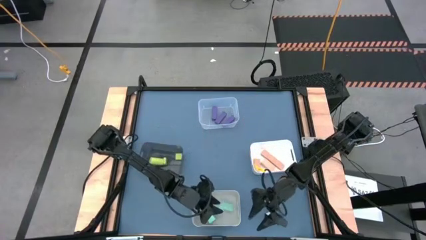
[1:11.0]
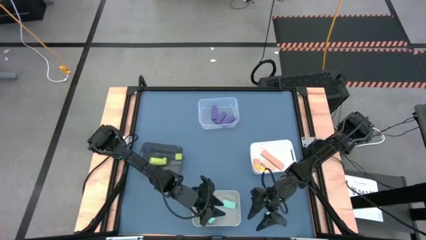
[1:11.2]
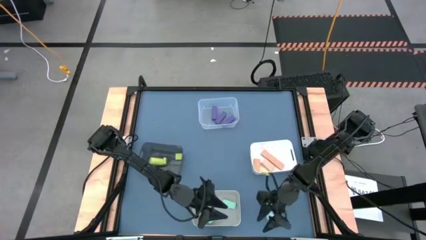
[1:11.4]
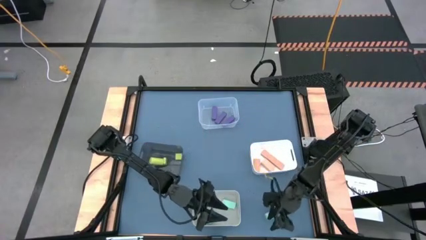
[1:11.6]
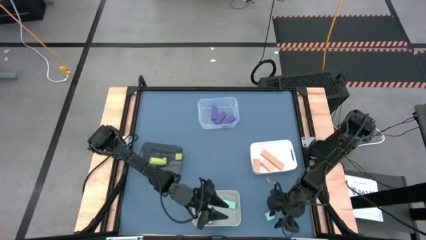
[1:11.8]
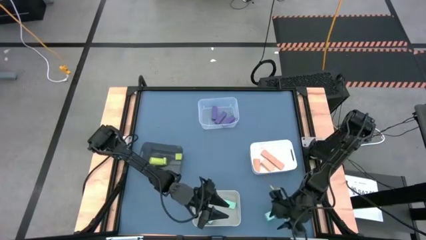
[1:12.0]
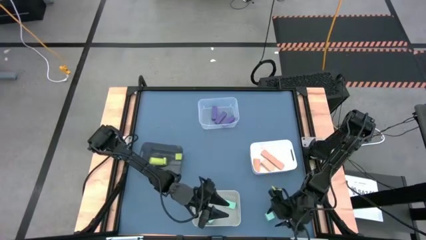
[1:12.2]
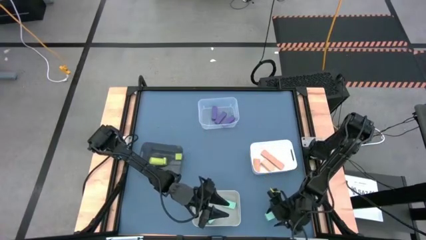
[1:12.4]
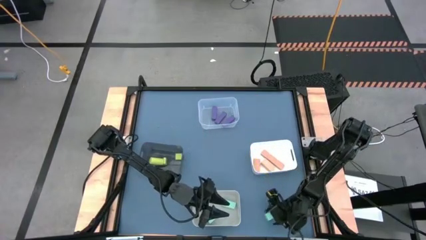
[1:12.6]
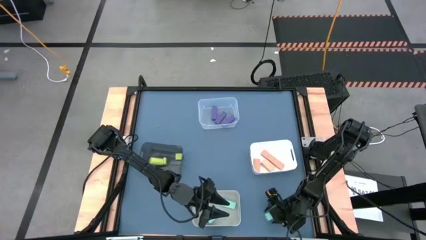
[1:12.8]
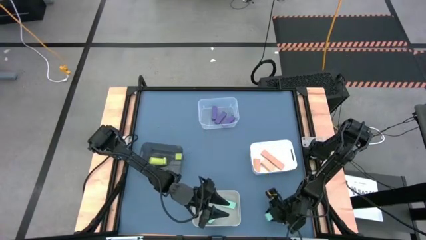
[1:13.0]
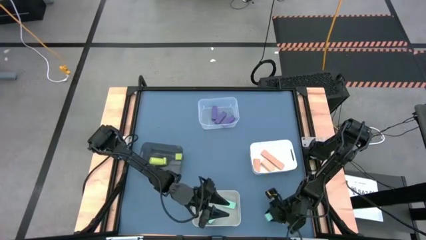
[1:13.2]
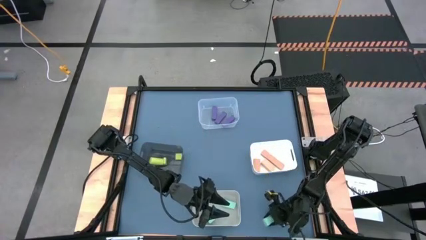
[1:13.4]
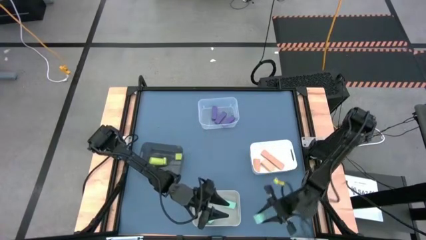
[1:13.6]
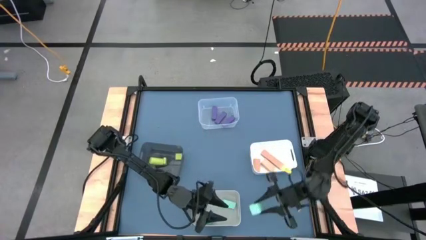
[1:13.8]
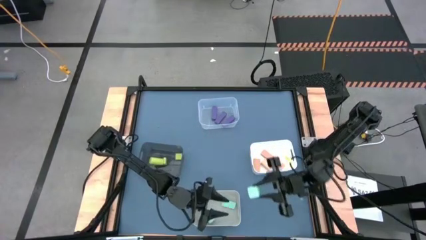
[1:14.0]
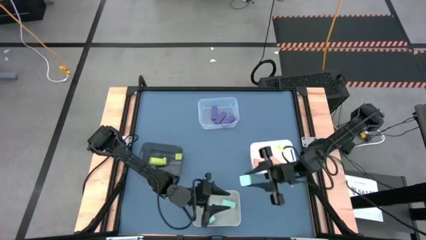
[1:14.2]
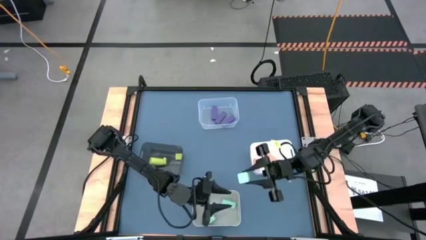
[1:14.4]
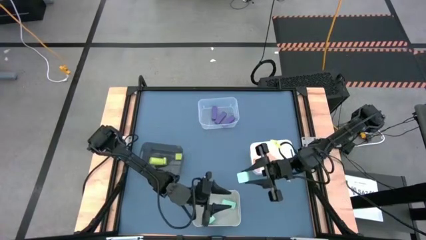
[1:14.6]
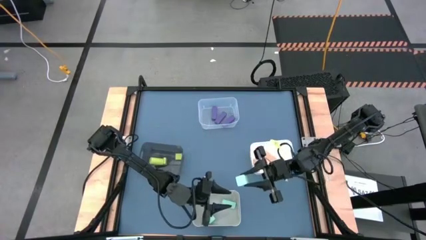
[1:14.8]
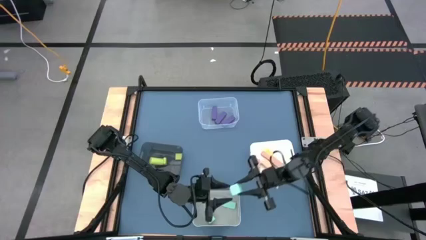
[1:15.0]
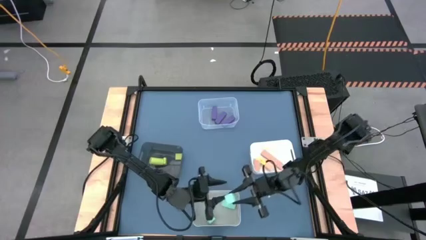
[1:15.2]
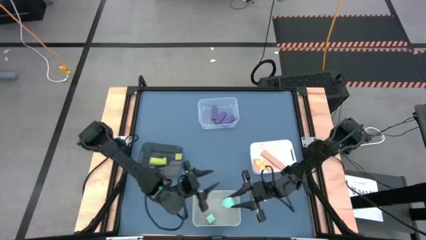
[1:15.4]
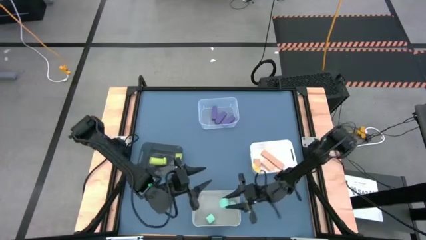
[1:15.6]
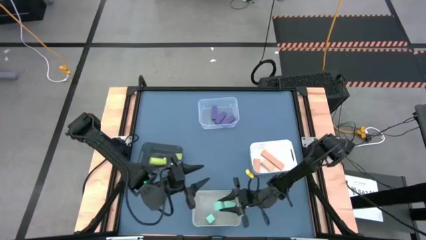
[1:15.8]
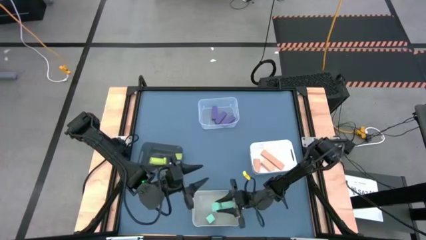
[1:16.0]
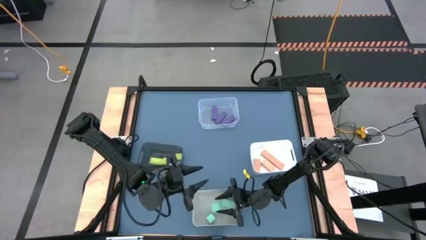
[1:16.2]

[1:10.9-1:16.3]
Task: Sort & place blocks by color
Put the light blue block into the gray bin

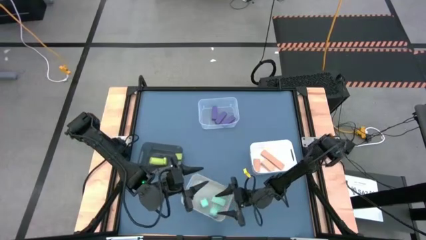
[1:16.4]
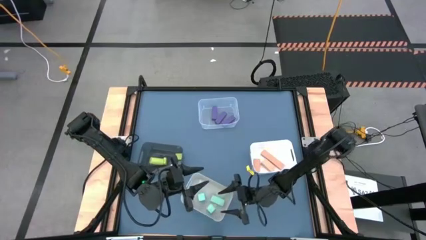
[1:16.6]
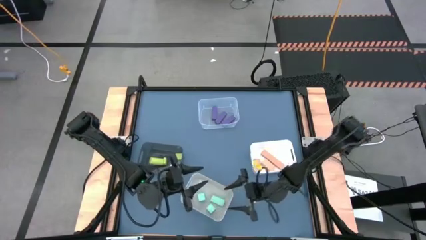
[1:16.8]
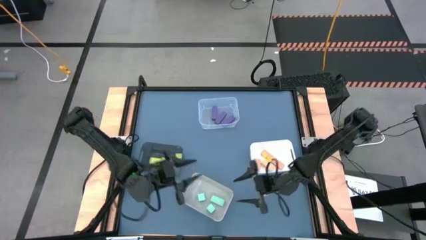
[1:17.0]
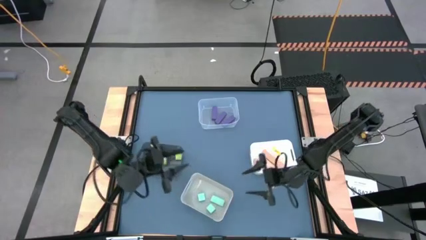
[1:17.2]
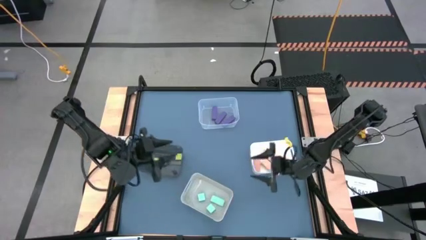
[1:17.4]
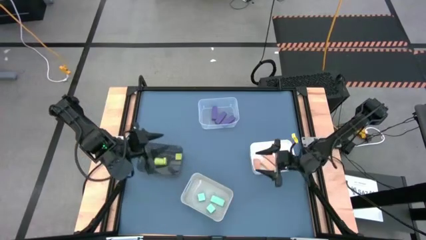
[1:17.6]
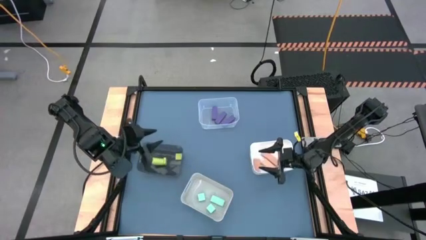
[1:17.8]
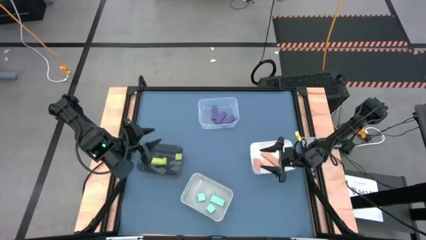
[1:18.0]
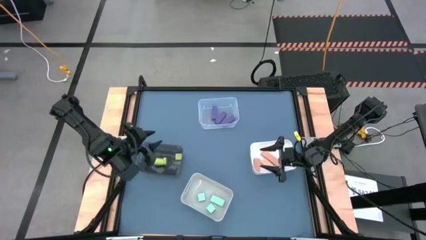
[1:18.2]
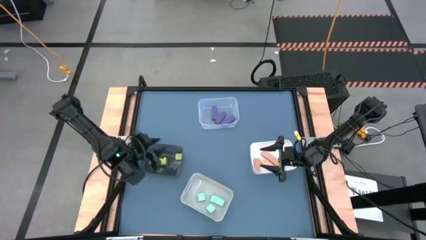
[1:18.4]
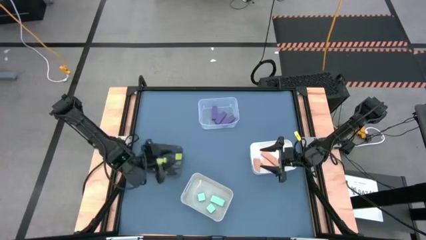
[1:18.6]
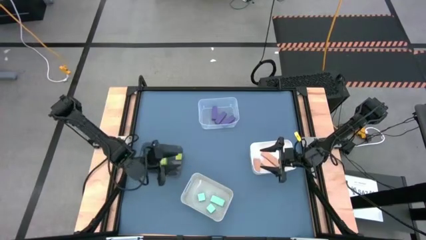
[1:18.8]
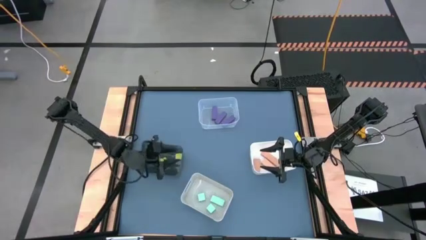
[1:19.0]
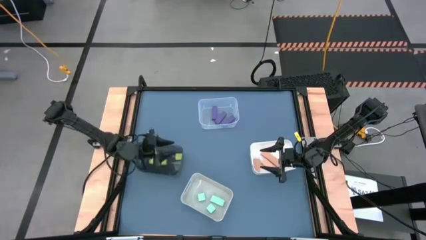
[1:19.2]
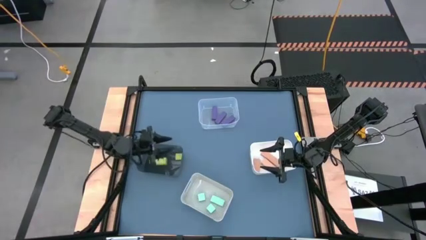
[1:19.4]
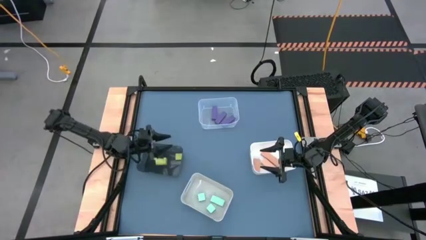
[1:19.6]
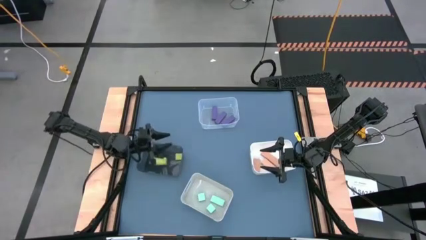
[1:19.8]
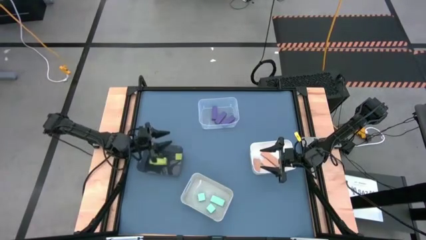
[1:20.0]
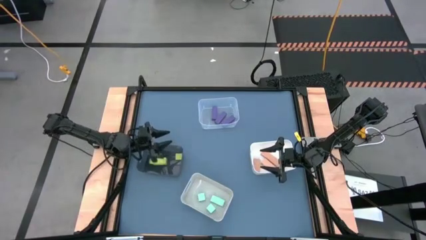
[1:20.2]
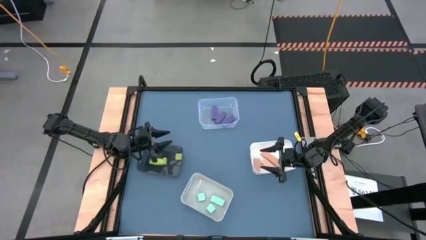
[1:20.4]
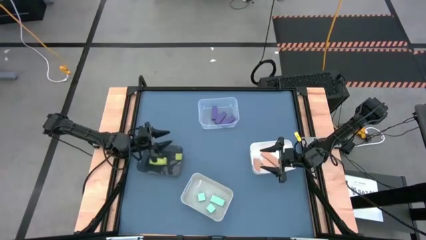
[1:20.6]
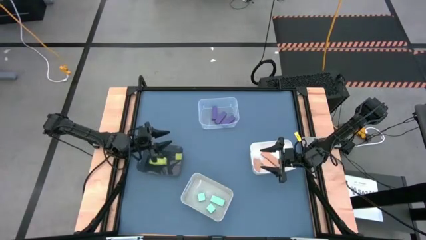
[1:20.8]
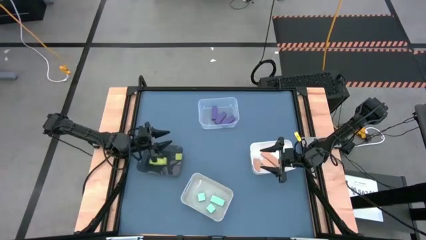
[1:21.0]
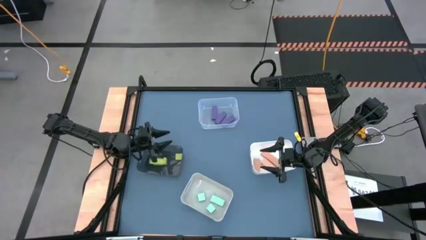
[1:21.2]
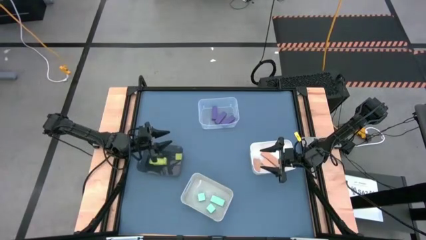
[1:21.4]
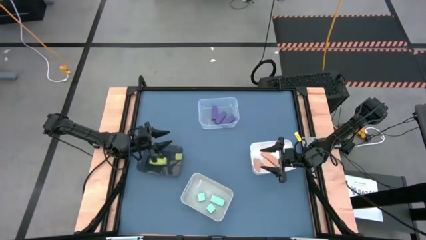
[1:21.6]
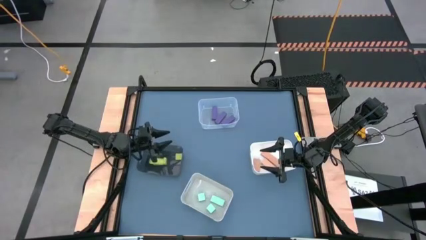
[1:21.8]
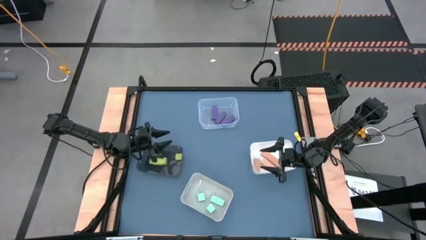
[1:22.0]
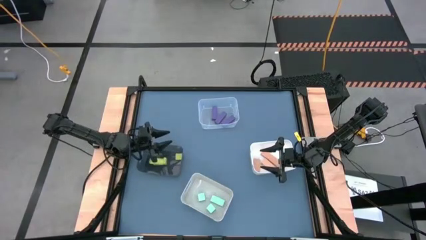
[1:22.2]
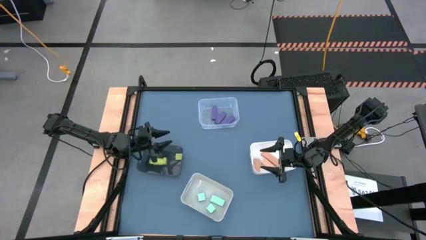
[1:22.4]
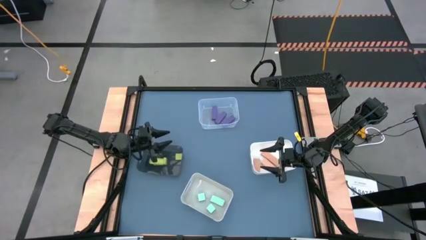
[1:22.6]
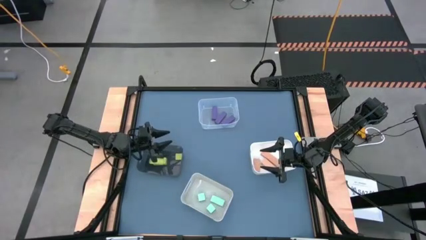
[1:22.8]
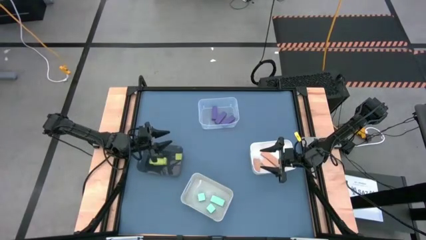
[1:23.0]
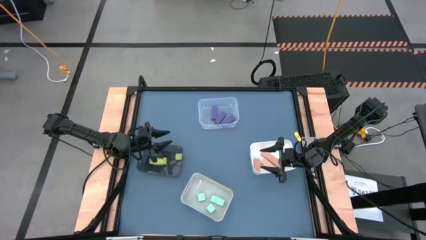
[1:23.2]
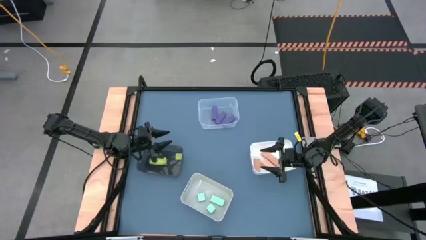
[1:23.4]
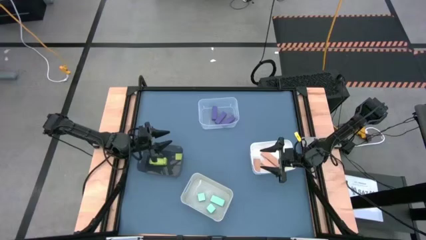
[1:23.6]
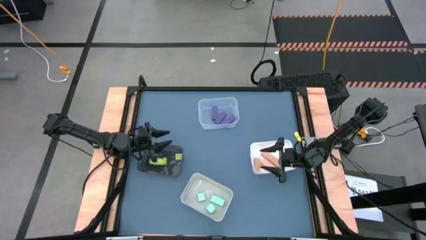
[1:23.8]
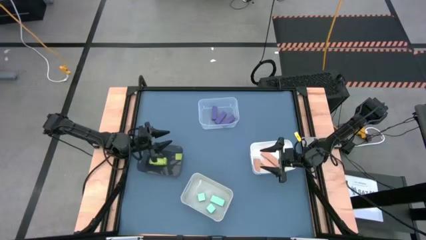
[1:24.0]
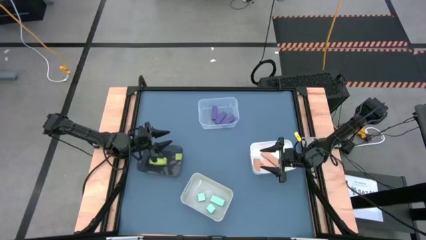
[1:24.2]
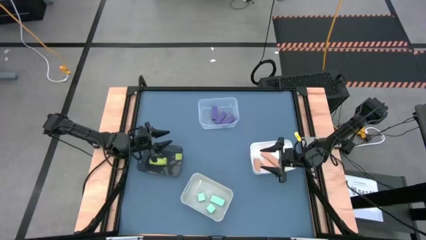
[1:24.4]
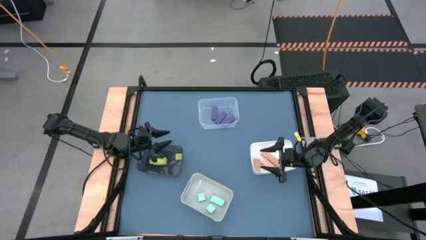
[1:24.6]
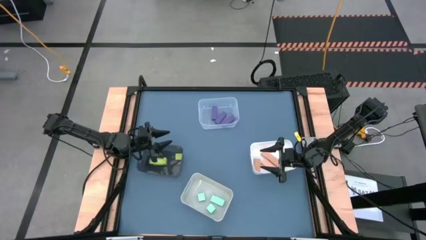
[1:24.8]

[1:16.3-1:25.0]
Return to Home Position

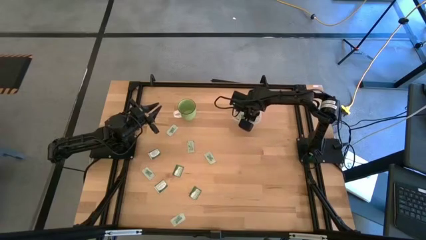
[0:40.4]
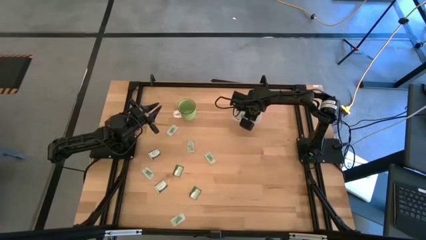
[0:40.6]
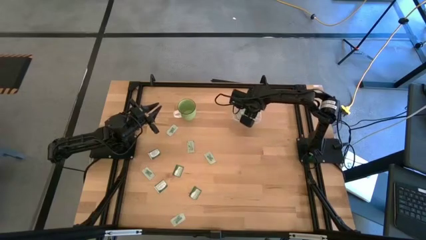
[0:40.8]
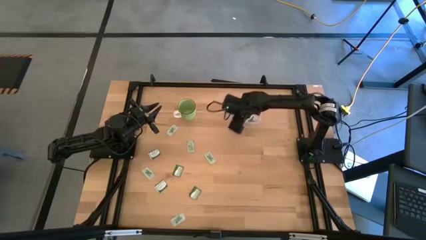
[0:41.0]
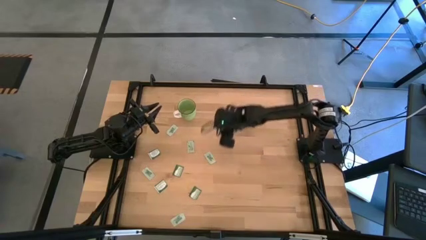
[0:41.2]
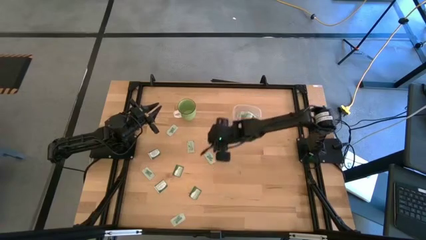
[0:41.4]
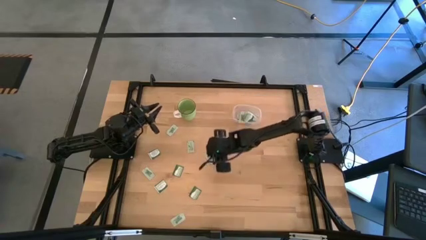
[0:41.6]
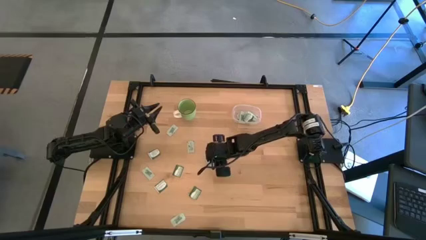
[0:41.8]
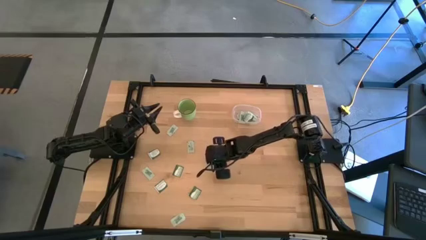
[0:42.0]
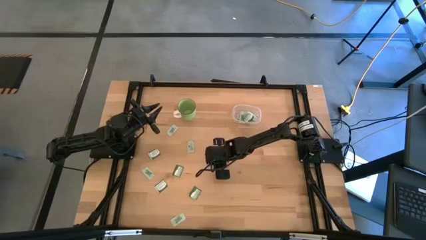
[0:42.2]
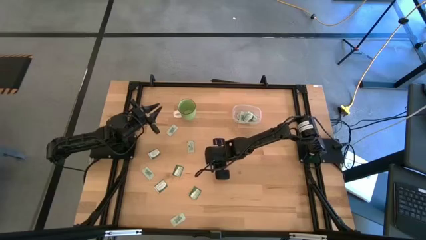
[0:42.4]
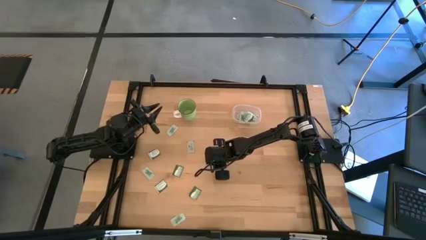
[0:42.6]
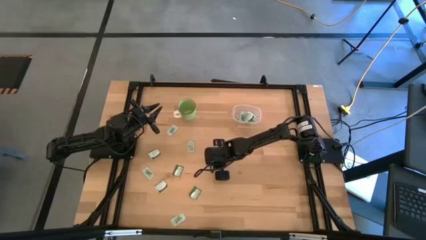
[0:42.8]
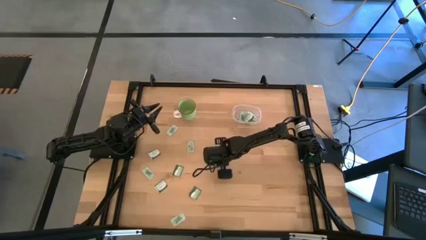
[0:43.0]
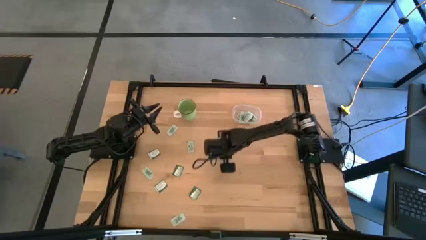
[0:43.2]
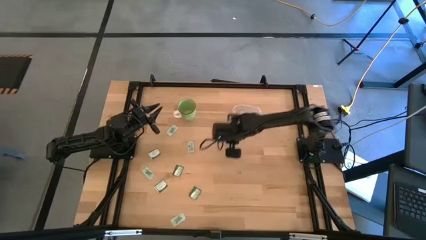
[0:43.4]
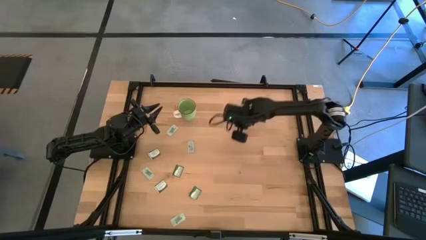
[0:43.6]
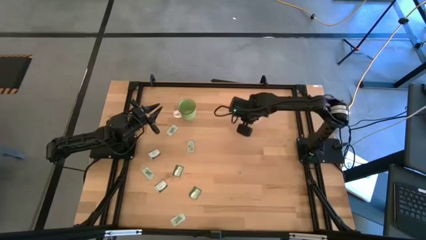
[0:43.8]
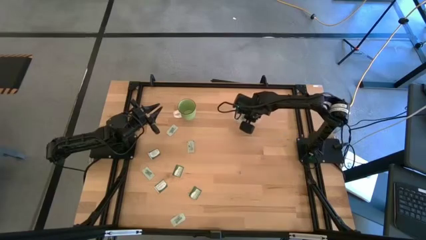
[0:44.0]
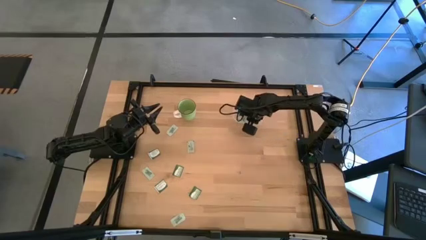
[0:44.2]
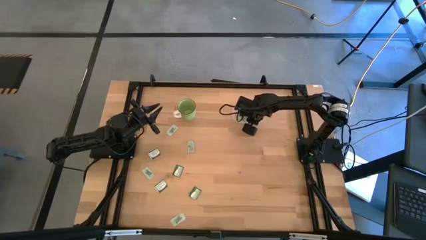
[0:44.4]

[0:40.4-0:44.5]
Task: Pick and place items into bin
Put the white stevia packet into the transparent bin
